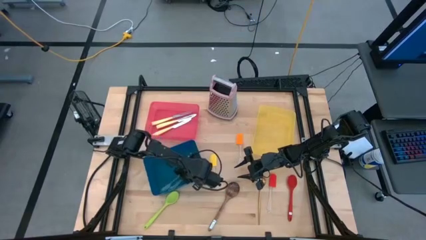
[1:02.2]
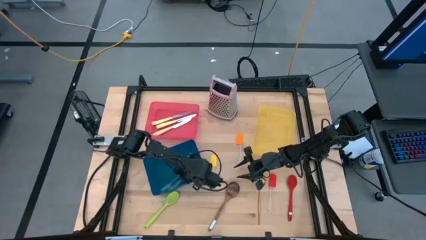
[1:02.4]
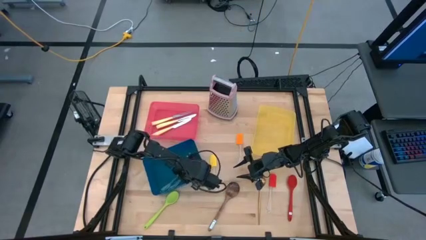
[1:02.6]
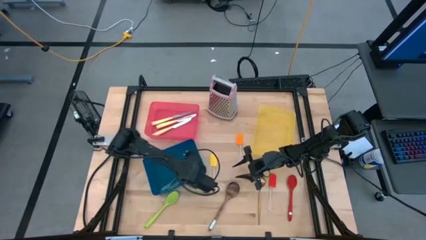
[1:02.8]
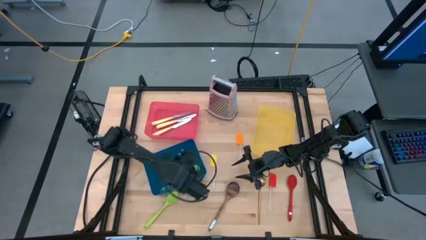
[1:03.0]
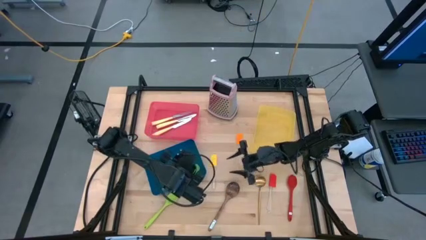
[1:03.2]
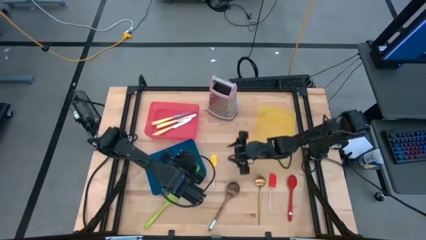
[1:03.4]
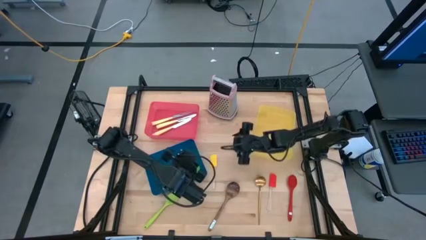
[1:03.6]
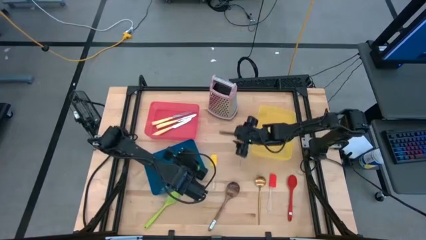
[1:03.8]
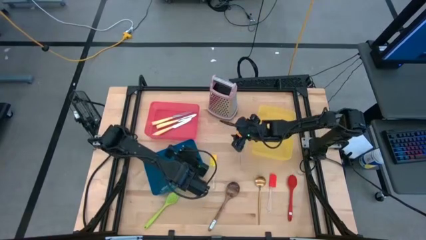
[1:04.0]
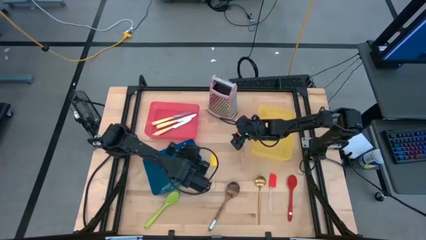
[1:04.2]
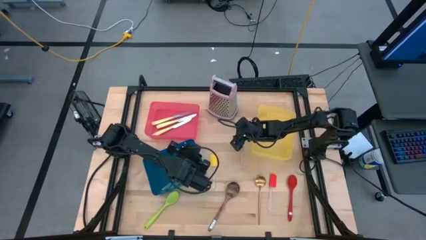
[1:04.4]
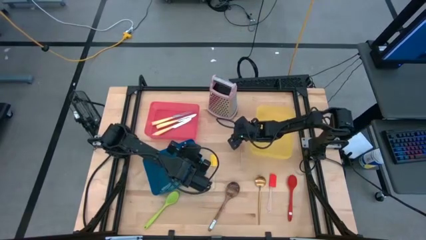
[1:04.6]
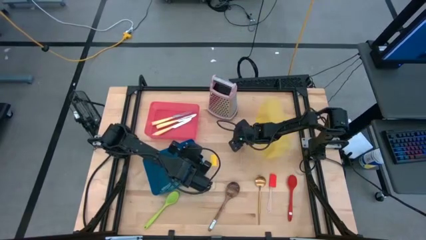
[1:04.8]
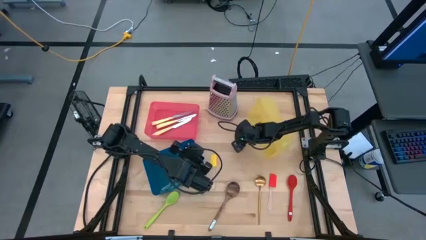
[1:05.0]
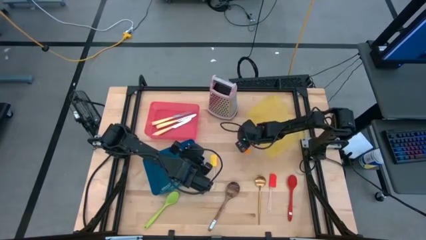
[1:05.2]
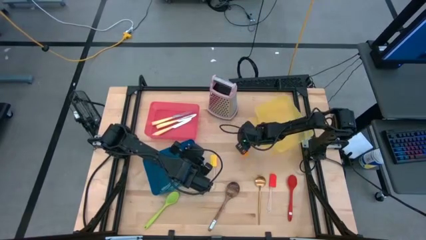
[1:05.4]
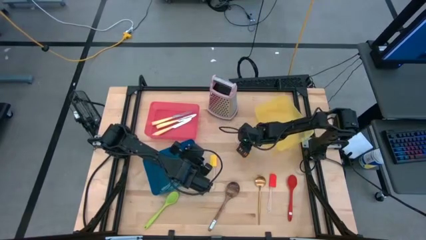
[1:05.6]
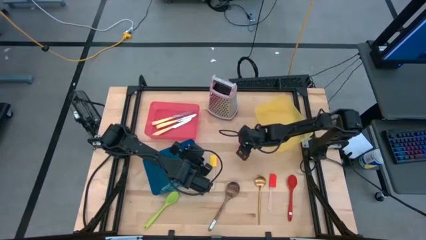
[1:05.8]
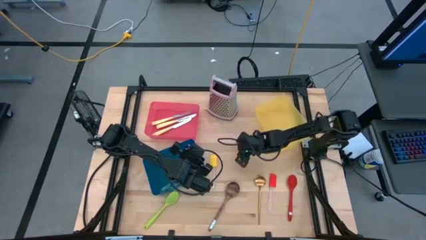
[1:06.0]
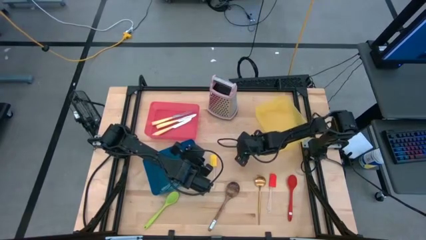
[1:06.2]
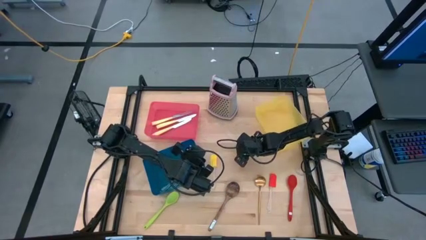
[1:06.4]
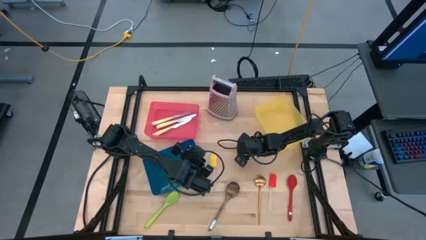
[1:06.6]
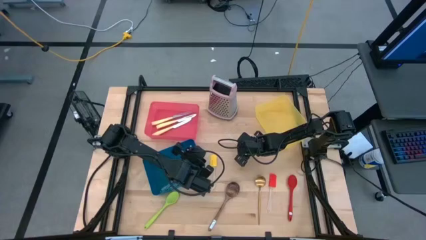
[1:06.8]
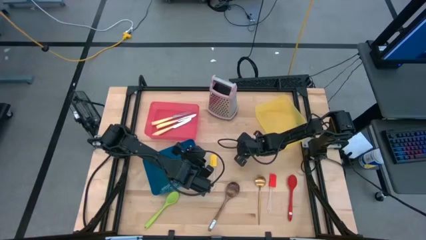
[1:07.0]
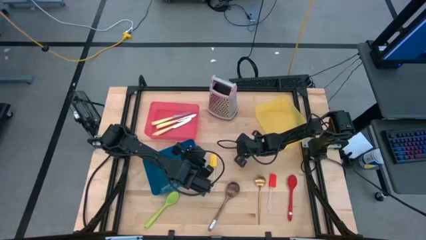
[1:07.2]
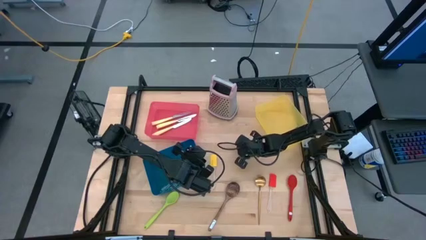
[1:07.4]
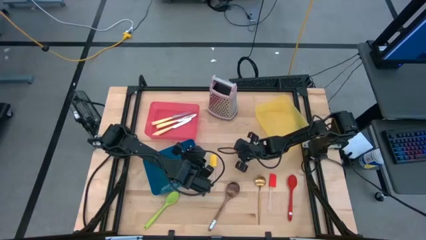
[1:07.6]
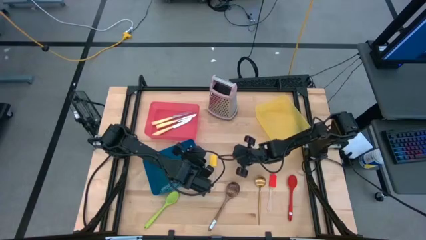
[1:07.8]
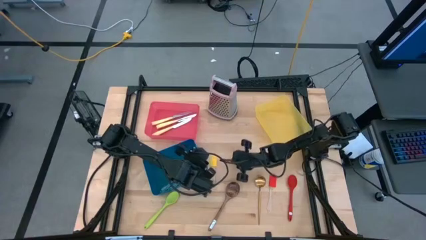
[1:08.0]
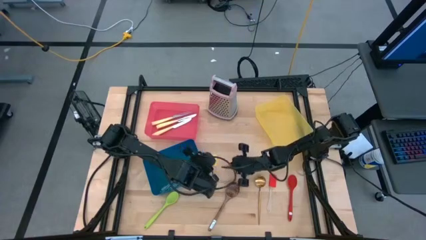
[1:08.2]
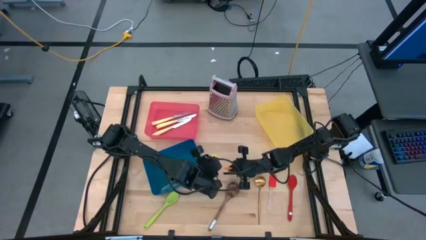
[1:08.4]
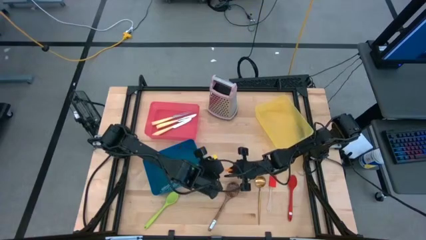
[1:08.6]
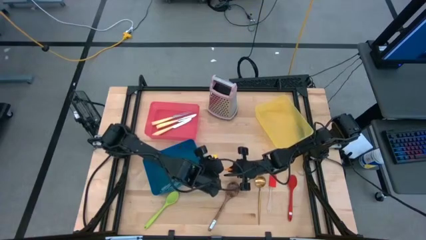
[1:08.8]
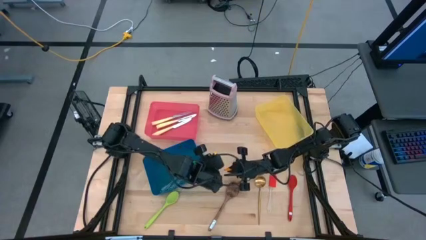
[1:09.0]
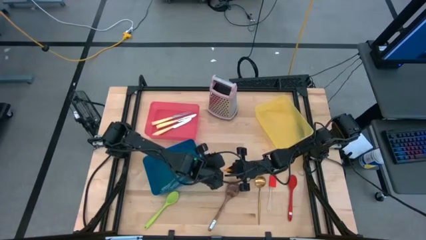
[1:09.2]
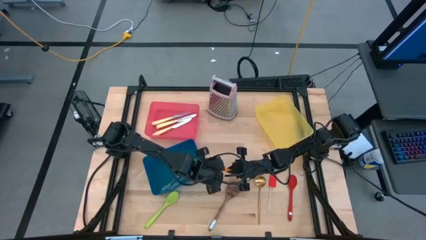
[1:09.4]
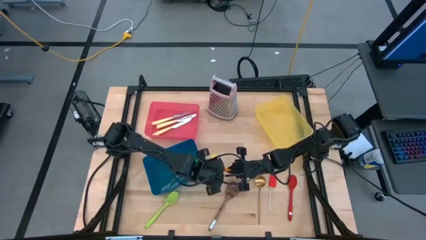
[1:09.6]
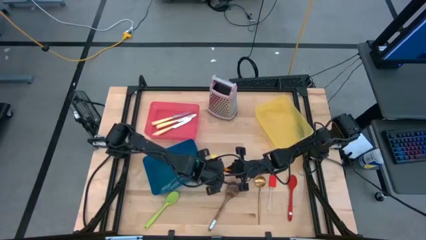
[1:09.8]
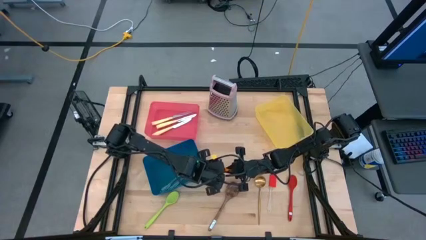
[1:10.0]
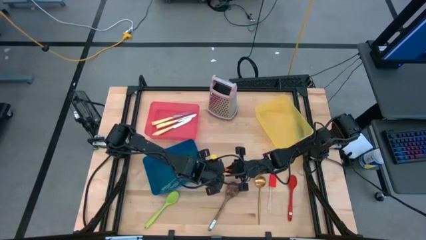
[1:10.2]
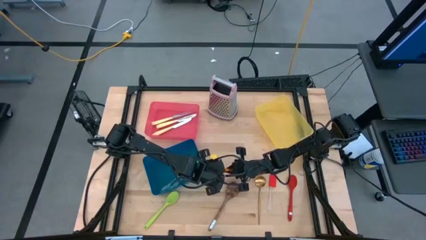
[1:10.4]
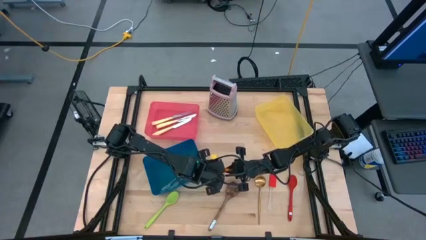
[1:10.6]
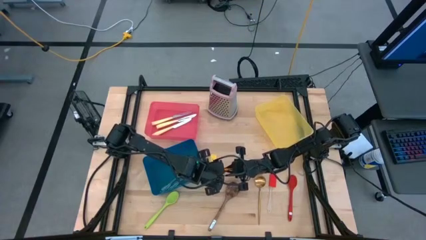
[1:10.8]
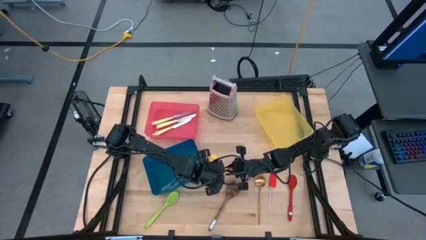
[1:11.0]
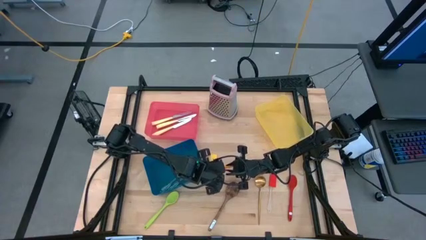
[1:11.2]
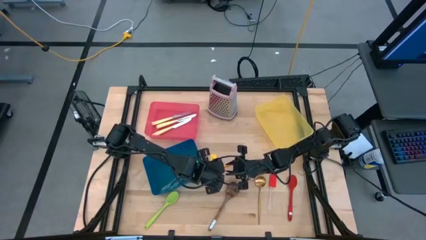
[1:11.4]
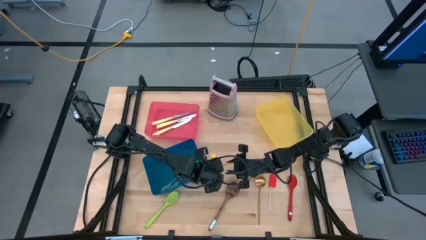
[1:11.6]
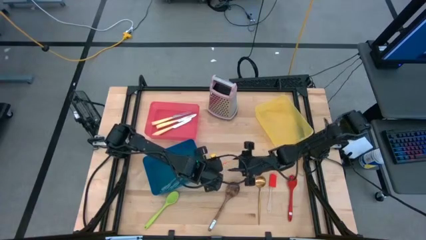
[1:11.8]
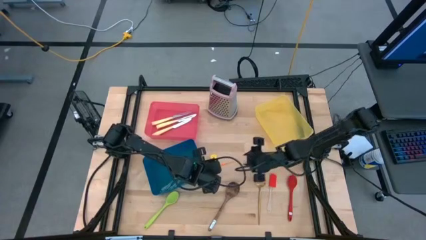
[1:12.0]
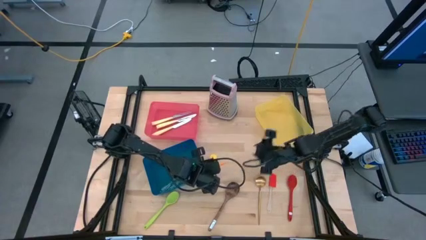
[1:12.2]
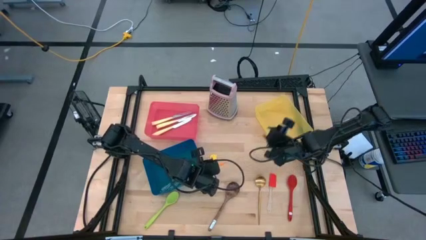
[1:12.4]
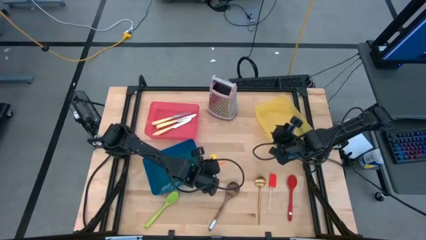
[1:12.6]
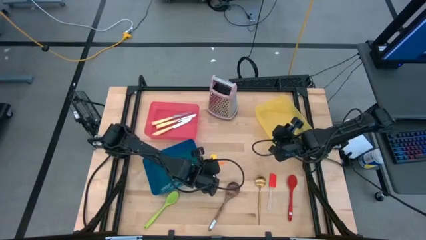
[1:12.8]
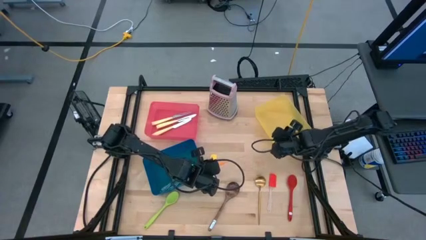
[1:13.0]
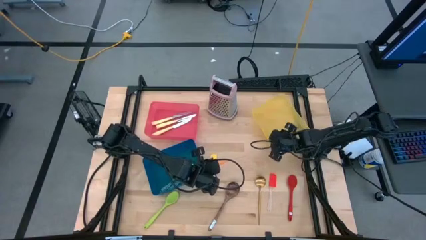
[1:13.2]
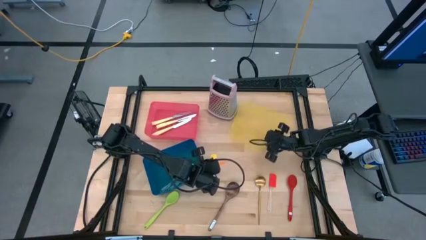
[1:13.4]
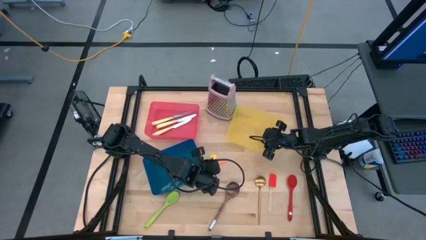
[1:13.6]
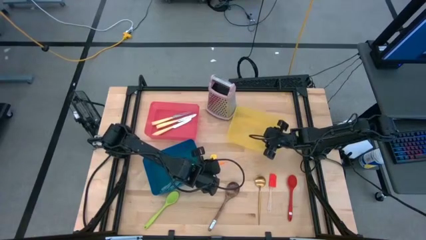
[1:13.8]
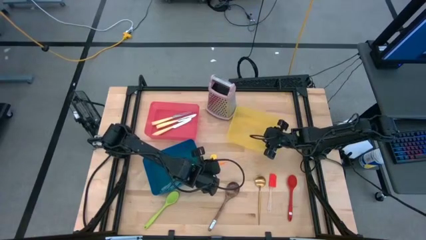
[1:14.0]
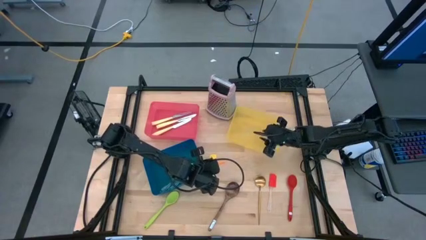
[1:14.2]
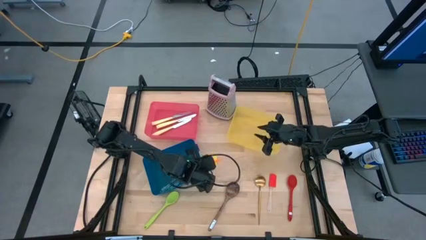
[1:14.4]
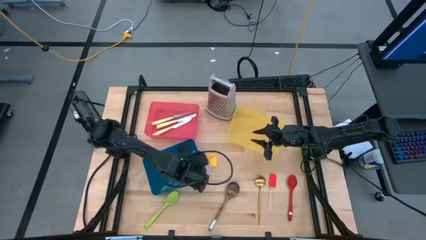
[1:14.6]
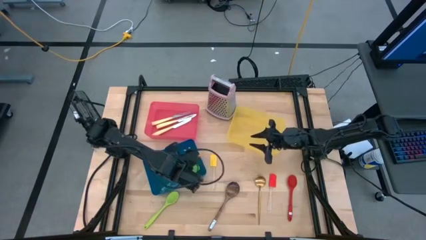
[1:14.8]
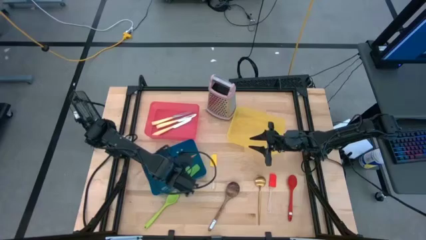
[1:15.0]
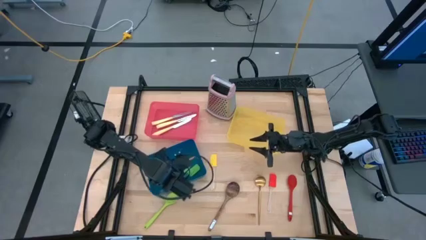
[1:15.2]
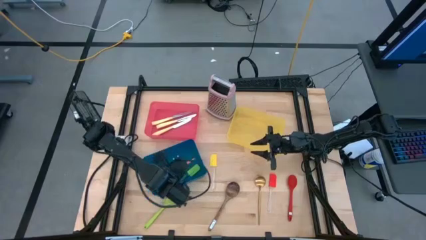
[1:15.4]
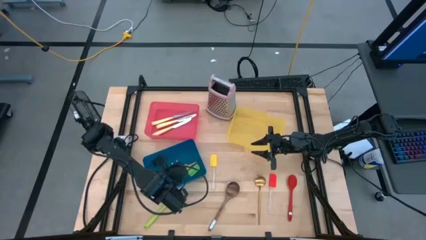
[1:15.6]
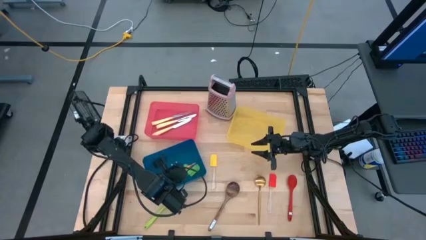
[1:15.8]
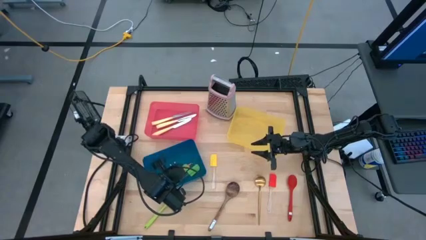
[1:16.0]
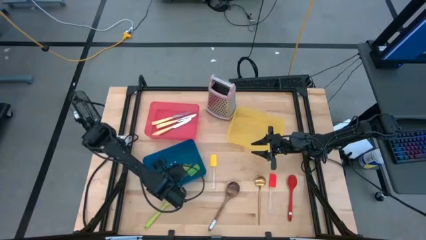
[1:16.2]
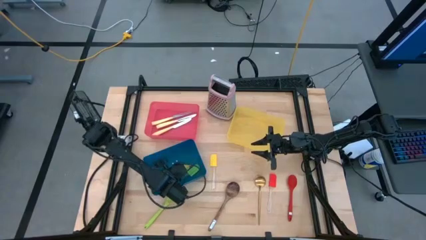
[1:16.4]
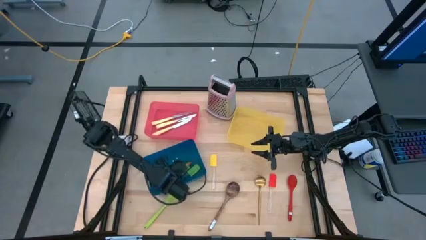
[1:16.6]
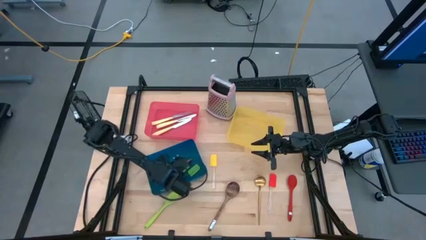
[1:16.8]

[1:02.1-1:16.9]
Task: Pick & Place Kitchen Items
Put the orange spatula into the blue bin

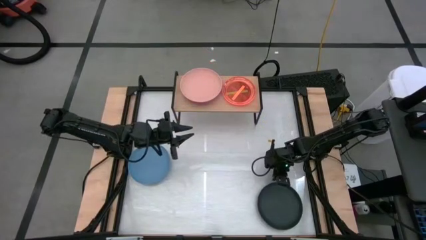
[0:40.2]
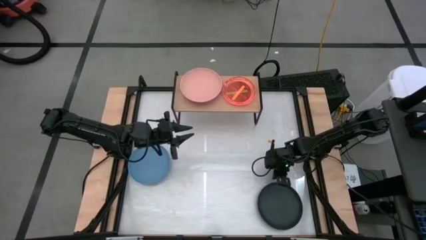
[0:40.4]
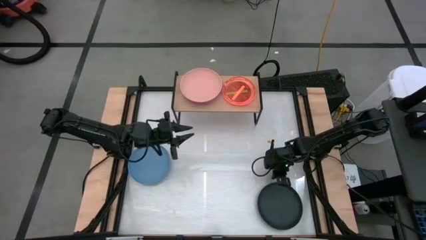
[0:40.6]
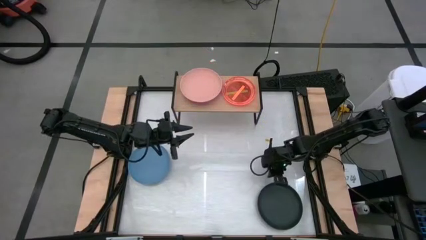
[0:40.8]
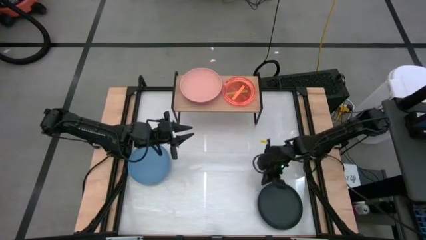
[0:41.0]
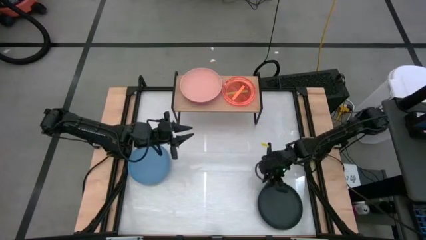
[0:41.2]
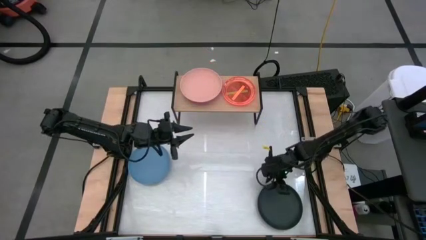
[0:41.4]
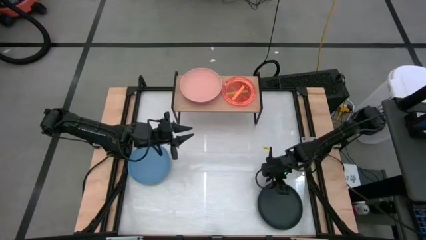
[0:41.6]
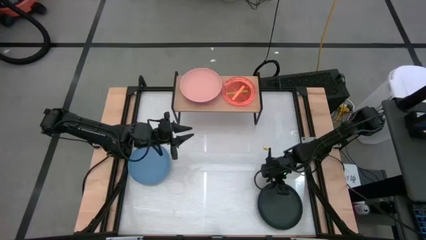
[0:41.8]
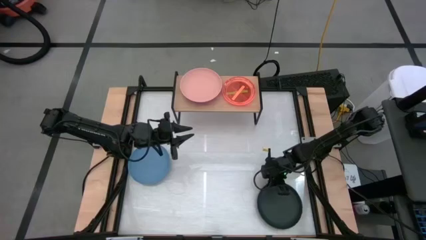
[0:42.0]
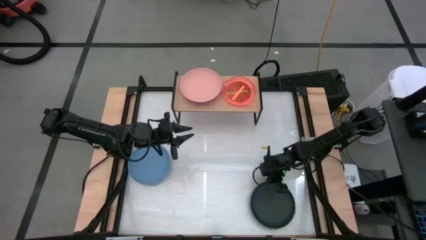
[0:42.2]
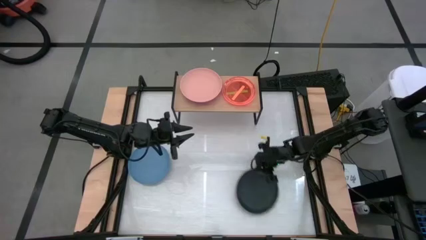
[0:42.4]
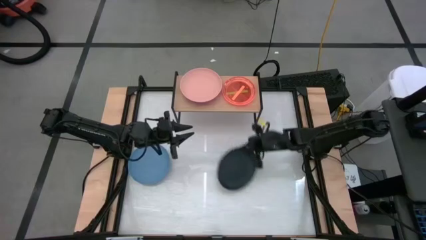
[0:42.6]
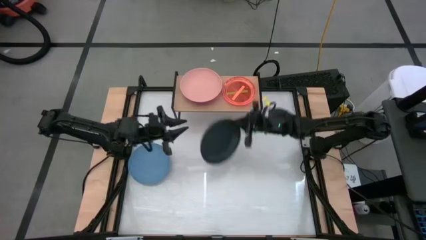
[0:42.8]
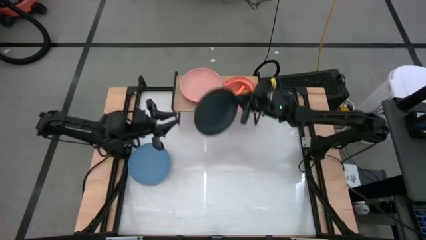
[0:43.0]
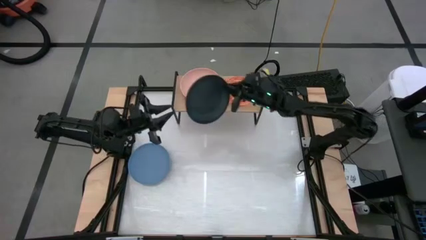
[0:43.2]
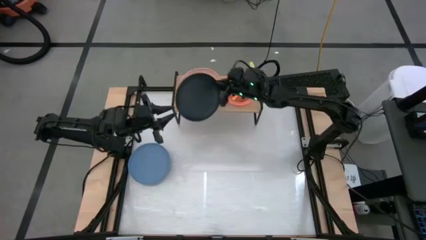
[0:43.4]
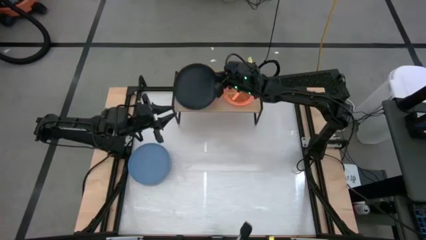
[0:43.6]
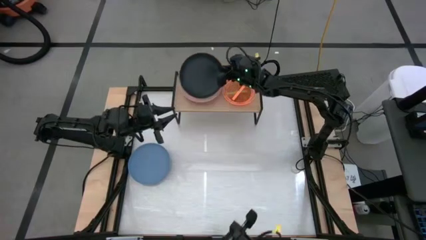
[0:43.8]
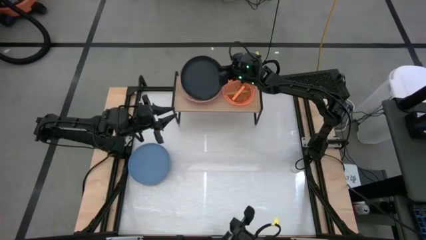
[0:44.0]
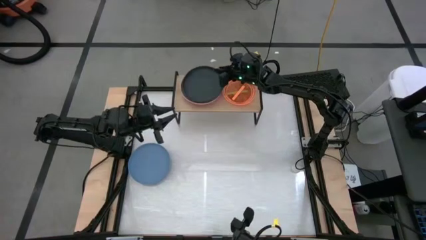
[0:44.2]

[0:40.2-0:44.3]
Task: Place and stack plates onto a shelf
Stack the black plate on top of the brown plate on the shelf
